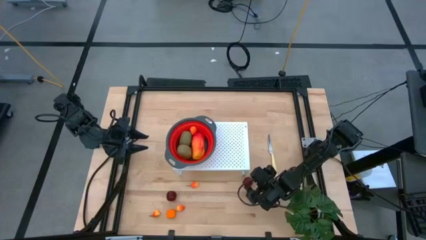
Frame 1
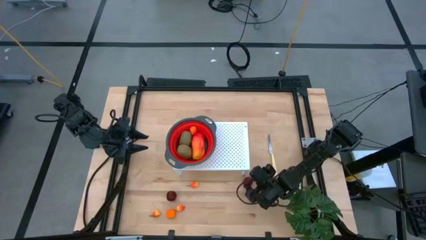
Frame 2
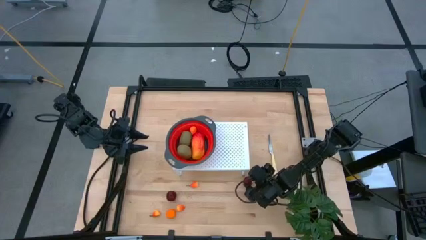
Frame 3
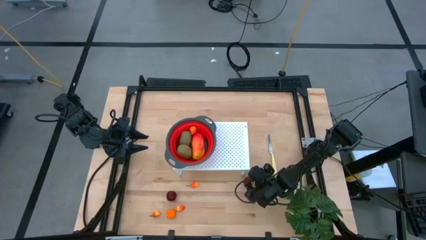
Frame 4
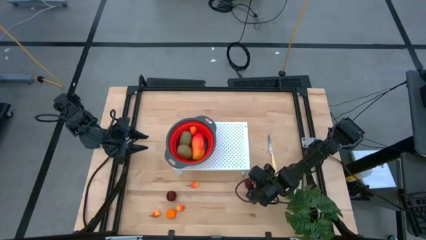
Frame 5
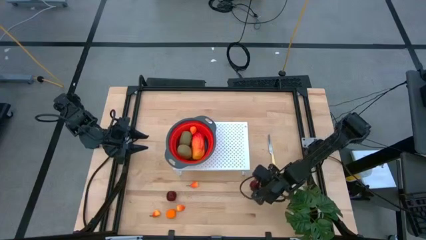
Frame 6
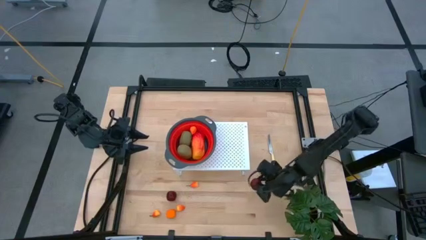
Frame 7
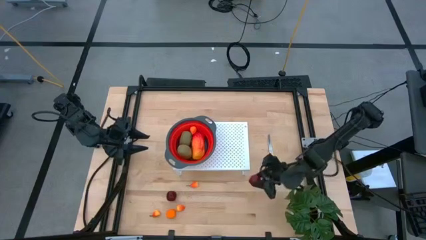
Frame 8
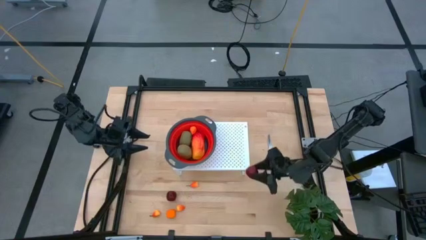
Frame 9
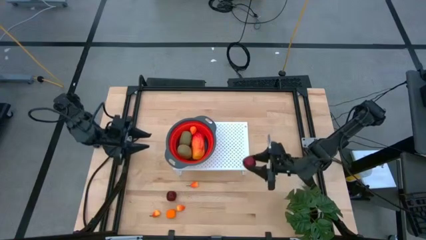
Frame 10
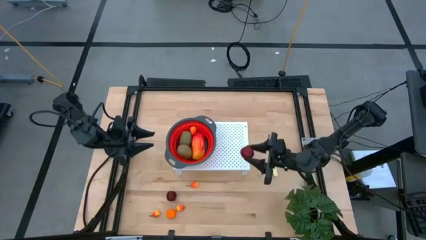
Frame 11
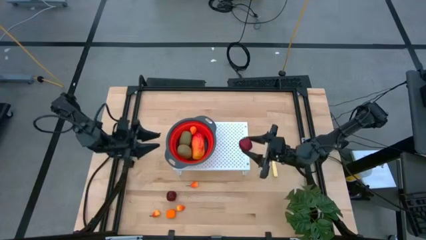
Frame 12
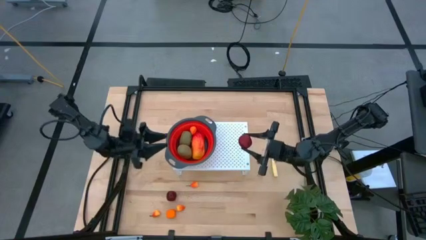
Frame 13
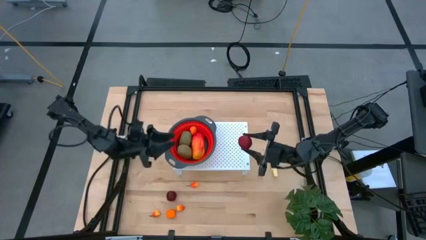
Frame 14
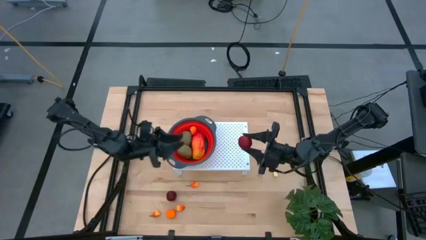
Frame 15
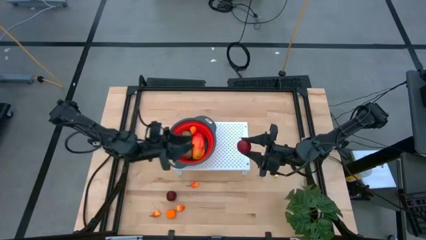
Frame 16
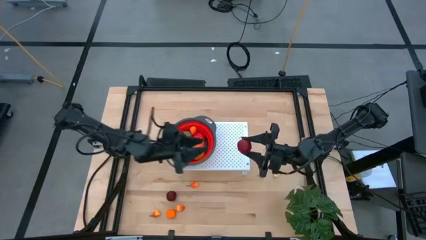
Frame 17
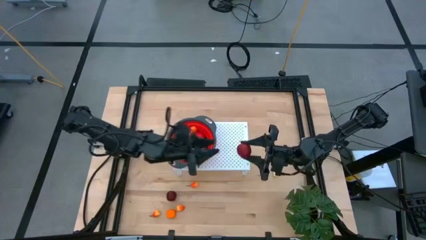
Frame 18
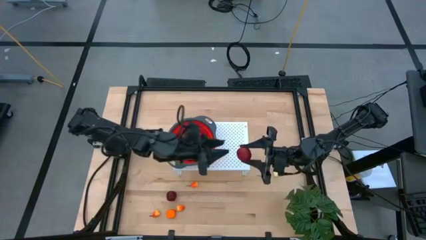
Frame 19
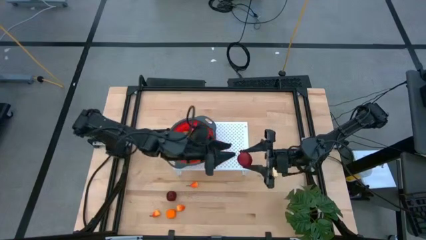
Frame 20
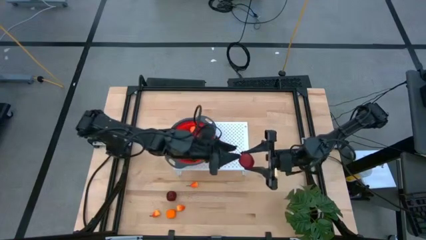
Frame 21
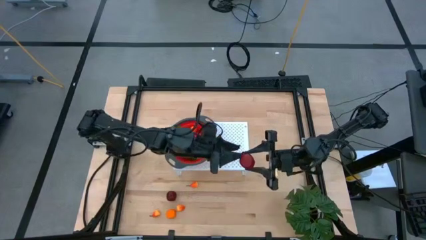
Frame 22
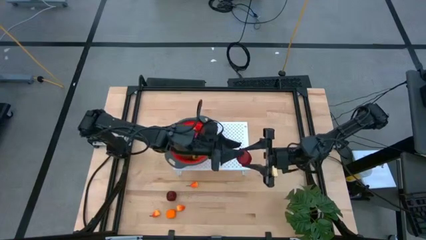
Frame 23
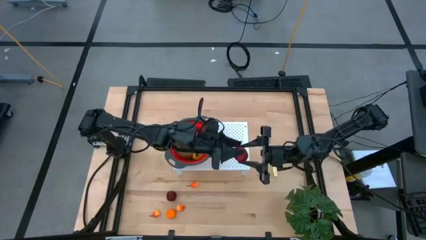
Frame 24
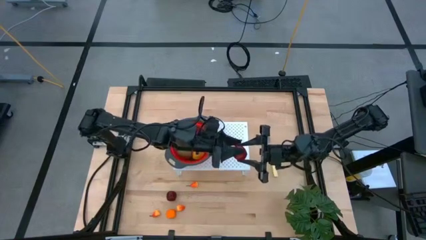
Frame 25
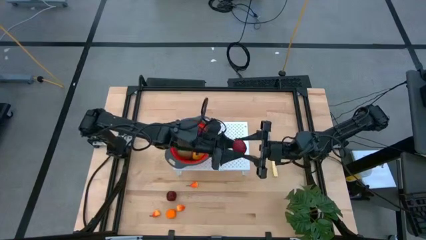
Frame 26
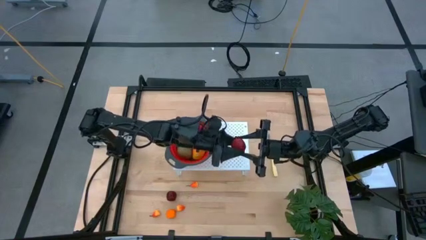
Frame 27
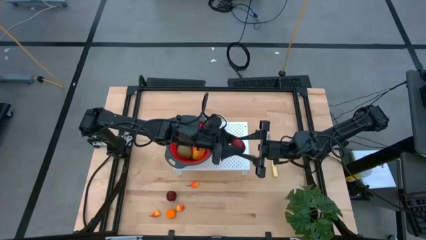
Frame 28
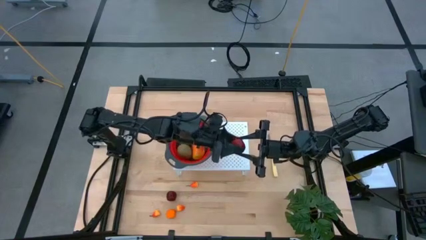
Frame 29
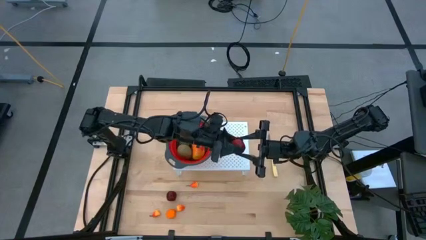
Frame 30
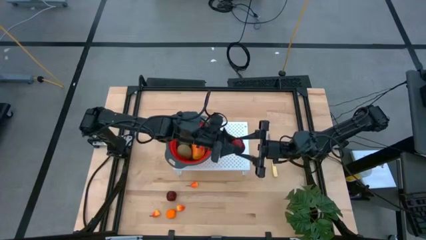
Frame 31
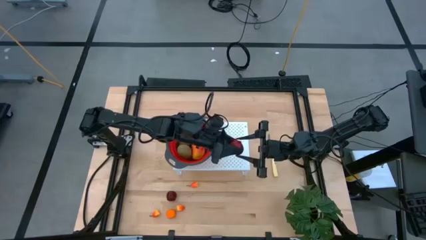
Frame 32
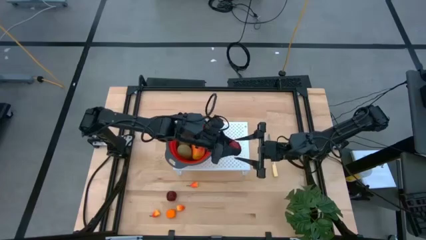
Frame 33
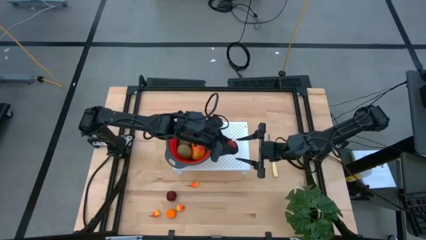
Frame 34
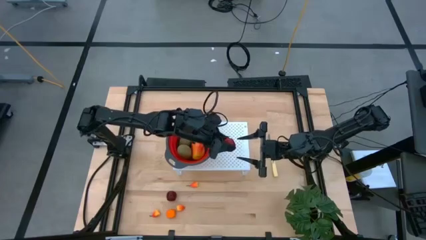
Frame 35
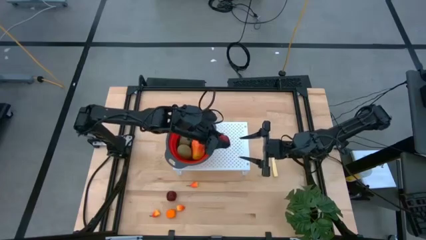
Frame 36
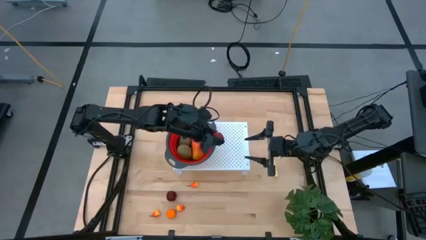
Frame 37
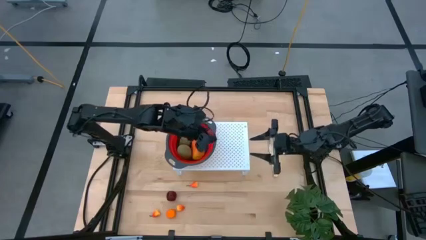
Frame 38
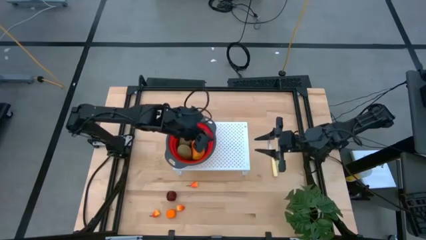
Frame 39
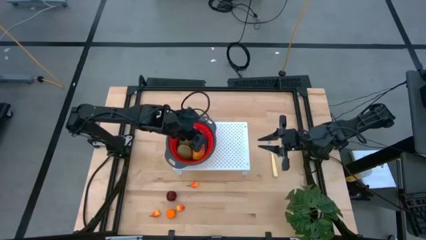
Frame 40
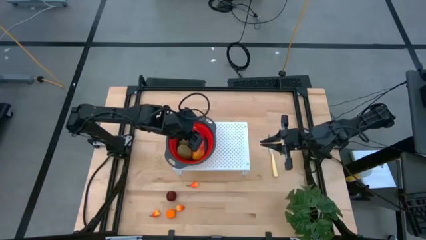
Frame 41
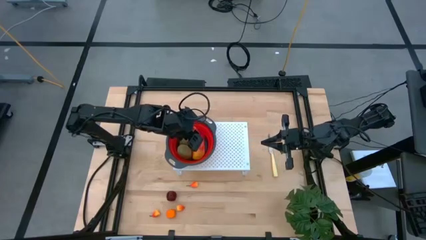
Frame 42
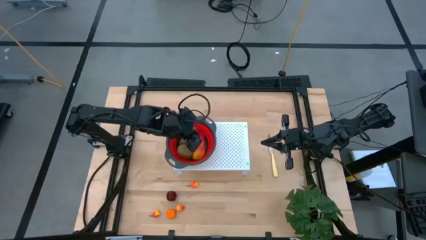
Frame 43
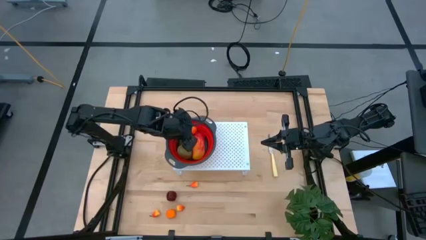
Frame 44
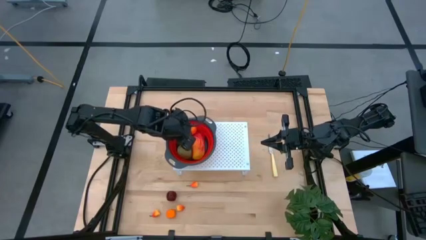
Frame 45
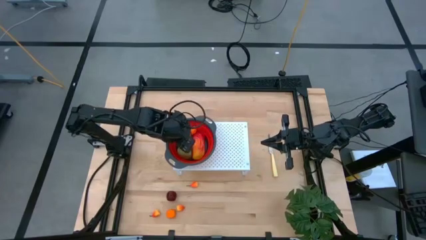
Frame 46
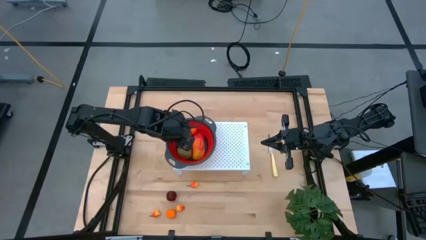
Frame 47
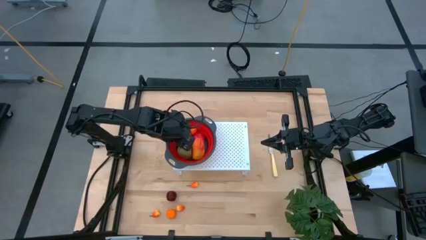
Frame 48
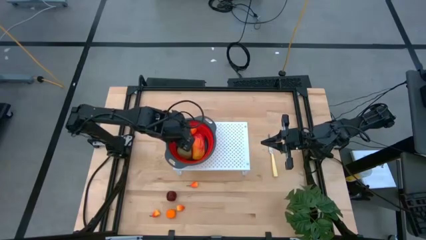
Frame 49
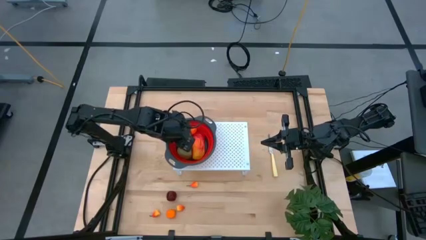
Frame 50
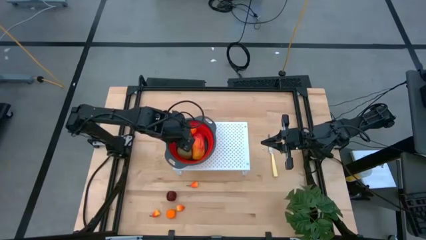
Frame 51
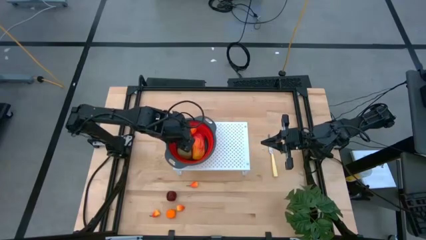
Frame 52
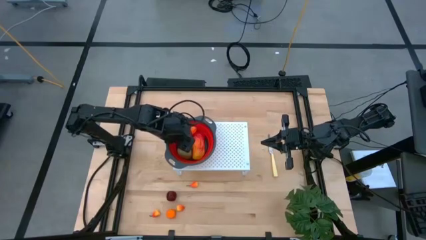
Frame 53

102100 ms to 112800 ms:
Task: Pick & Place Fruit
Put the red pomegranate into the red strainer bowl on the shelf
